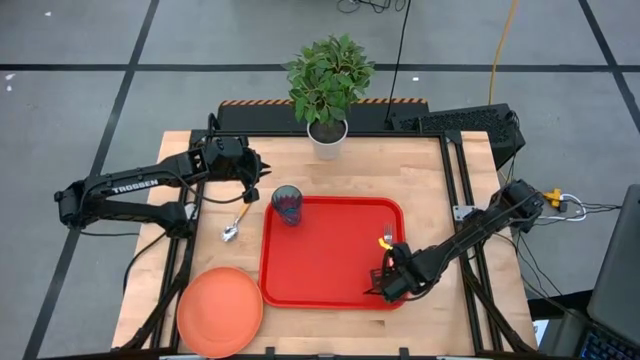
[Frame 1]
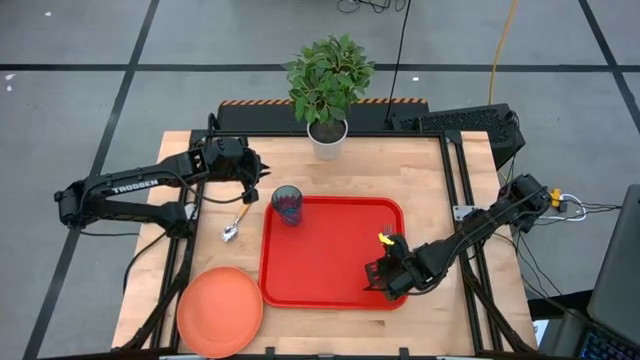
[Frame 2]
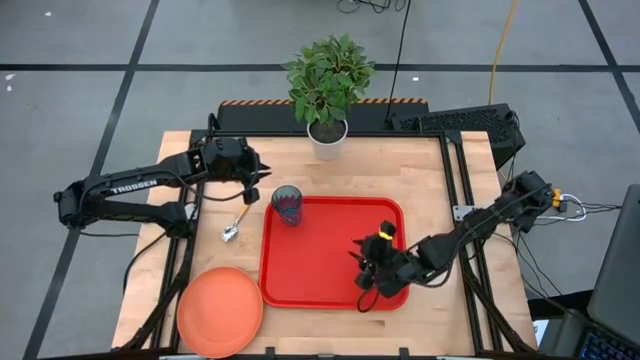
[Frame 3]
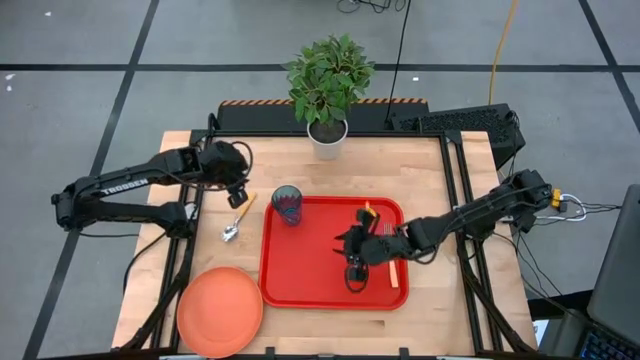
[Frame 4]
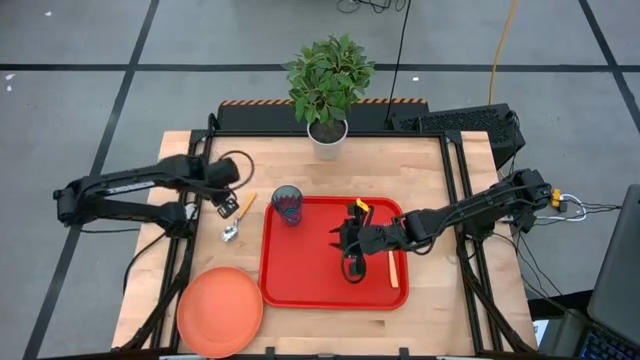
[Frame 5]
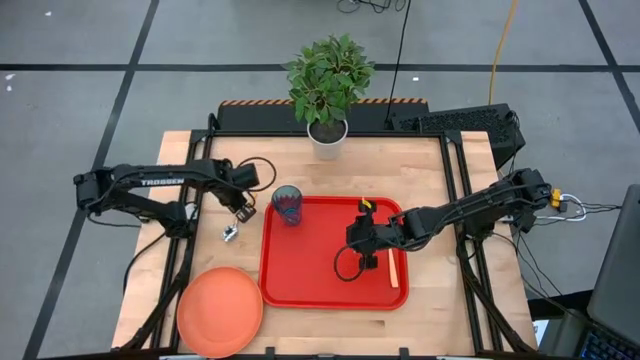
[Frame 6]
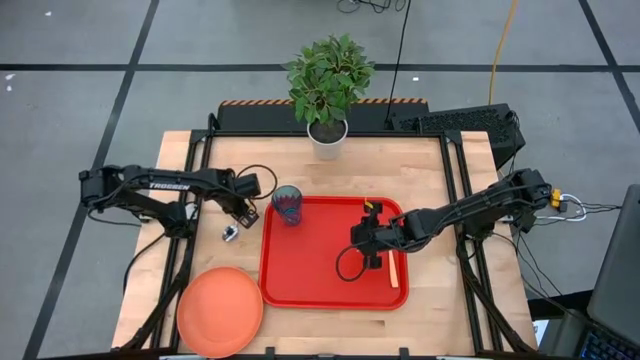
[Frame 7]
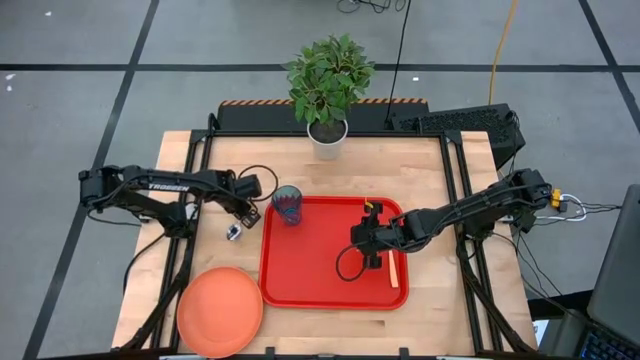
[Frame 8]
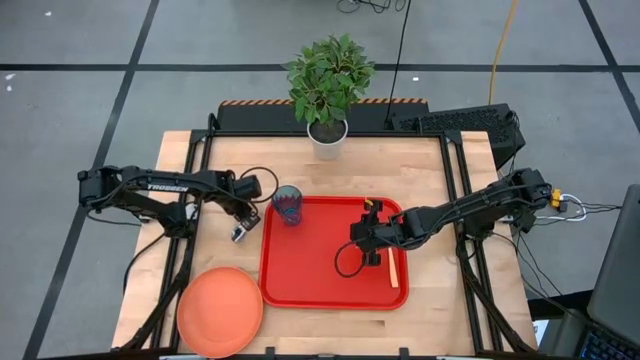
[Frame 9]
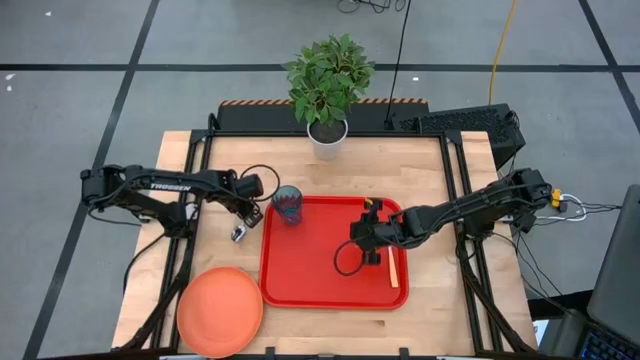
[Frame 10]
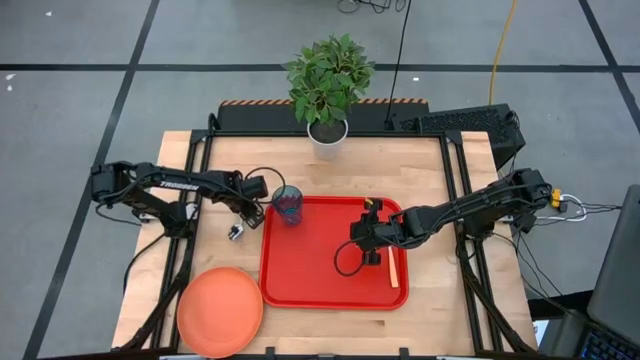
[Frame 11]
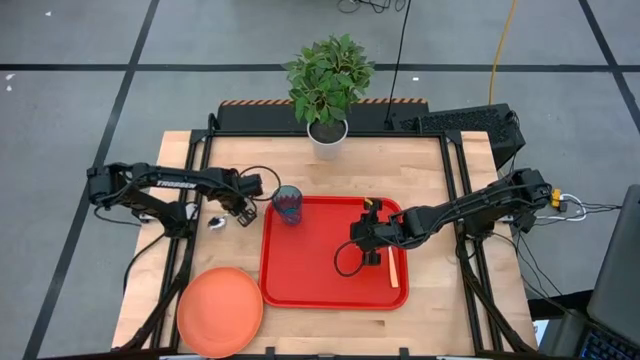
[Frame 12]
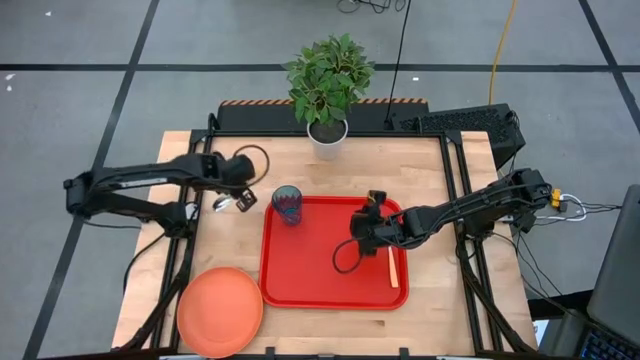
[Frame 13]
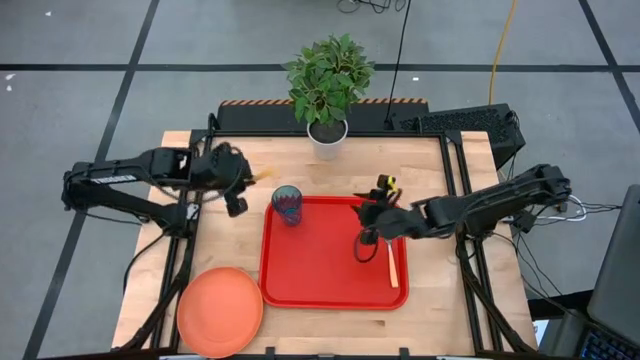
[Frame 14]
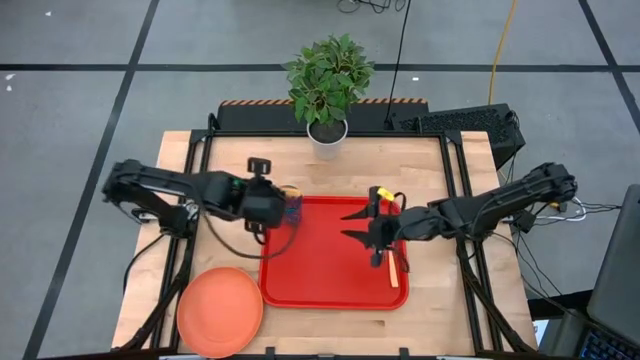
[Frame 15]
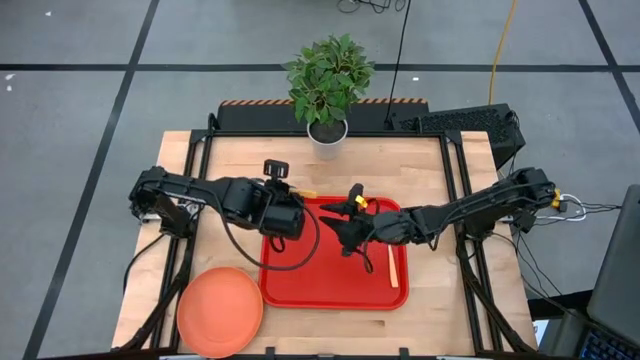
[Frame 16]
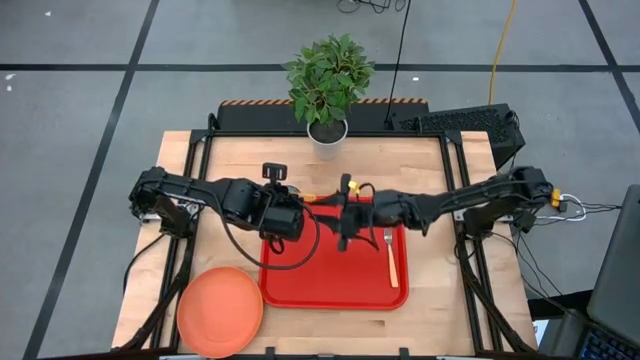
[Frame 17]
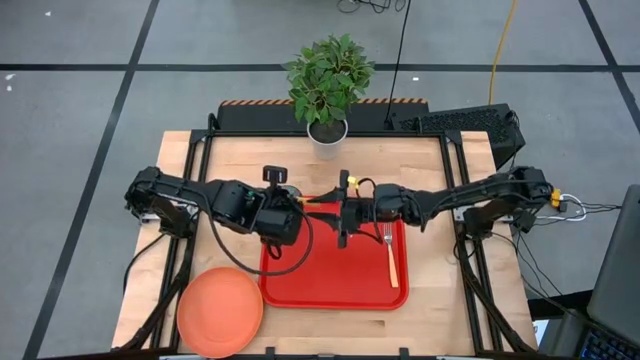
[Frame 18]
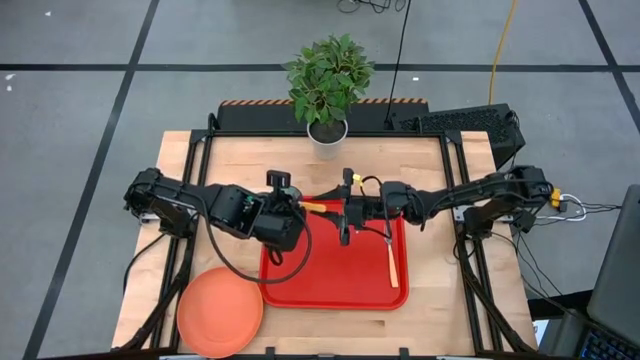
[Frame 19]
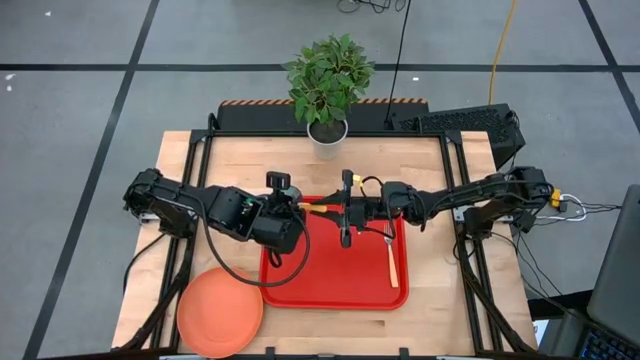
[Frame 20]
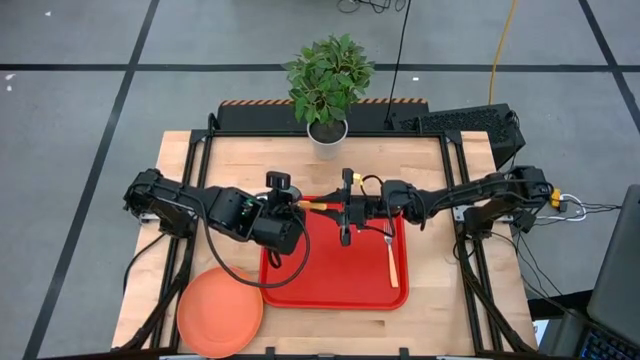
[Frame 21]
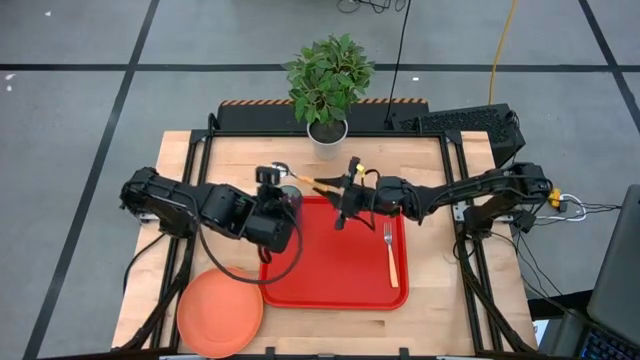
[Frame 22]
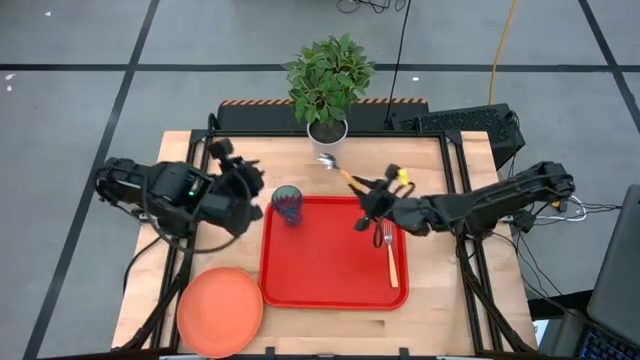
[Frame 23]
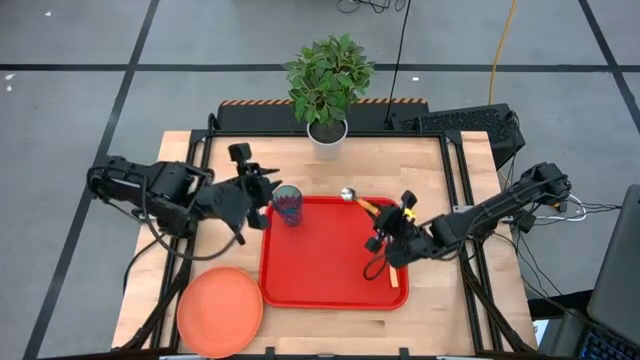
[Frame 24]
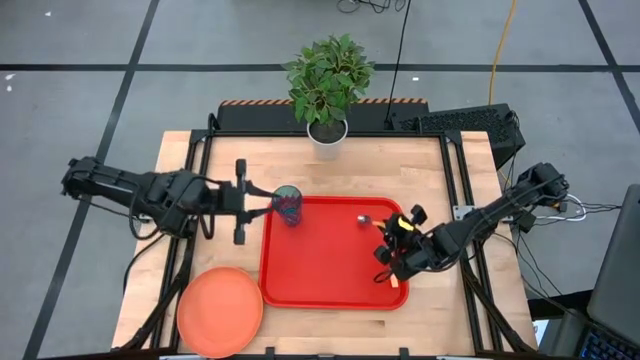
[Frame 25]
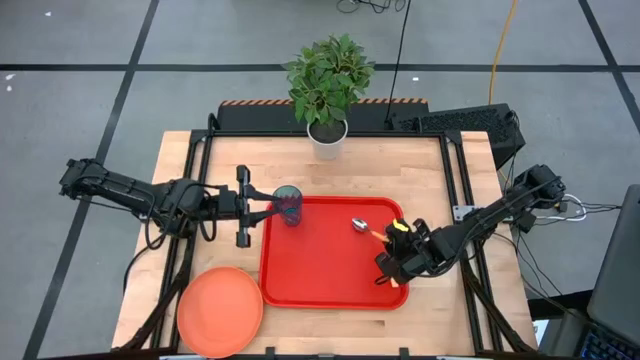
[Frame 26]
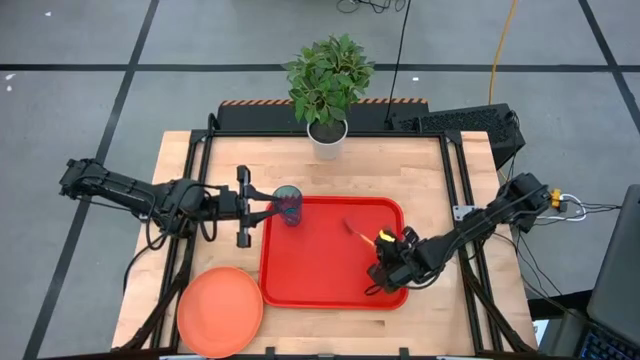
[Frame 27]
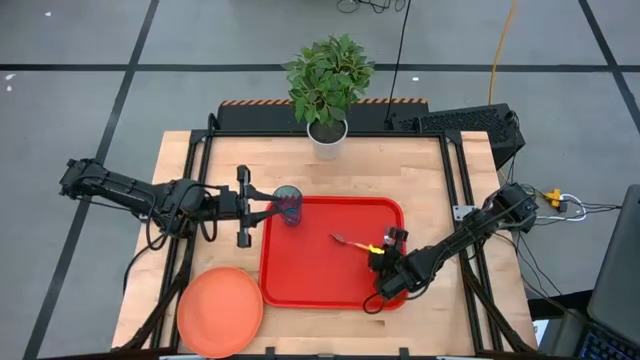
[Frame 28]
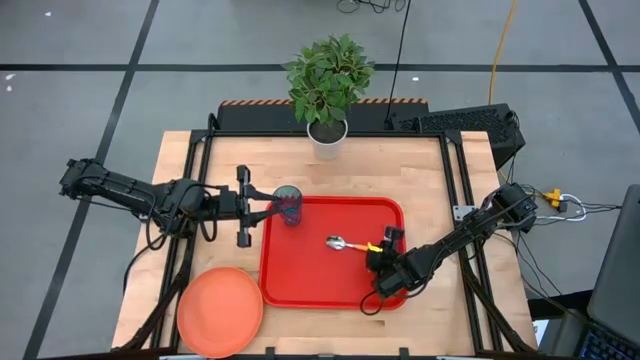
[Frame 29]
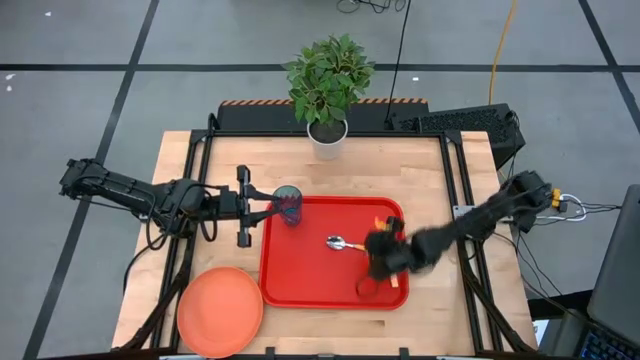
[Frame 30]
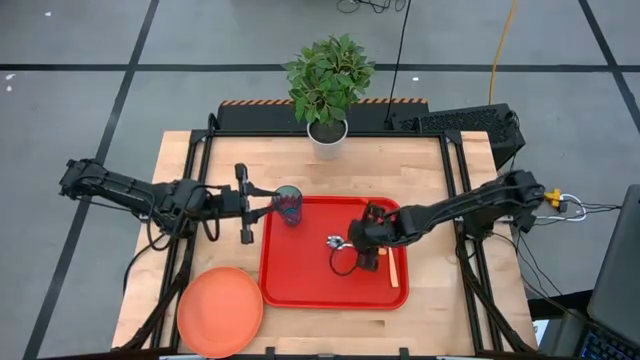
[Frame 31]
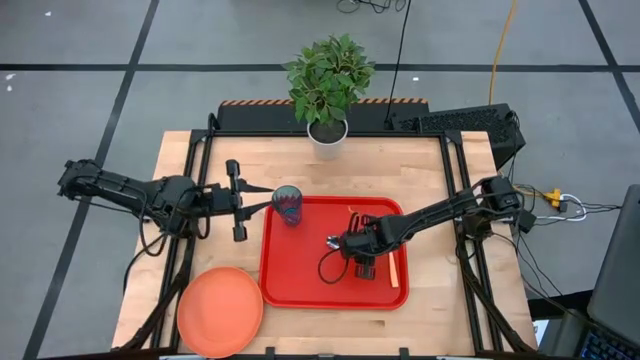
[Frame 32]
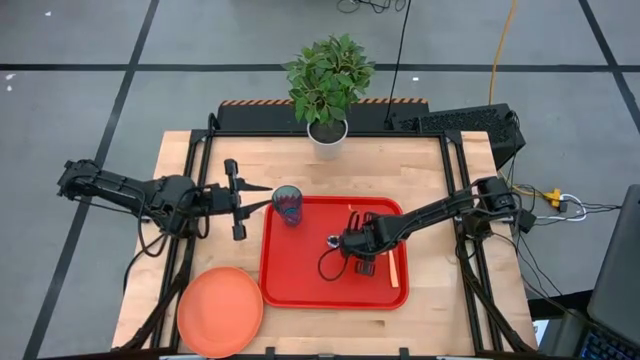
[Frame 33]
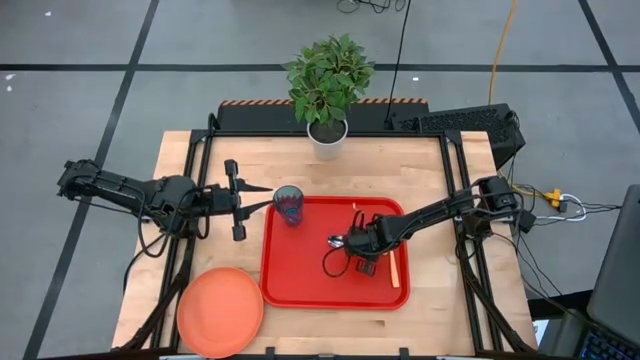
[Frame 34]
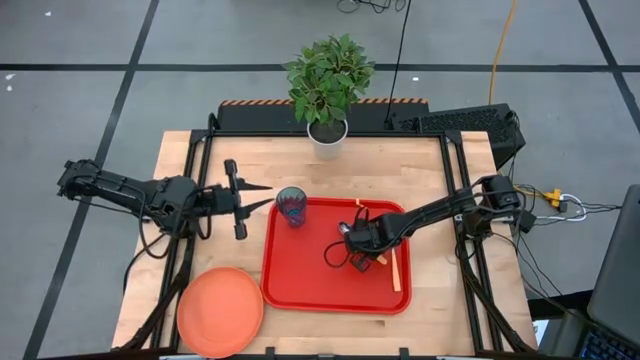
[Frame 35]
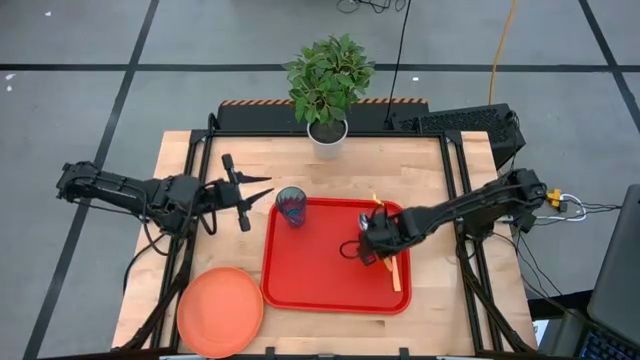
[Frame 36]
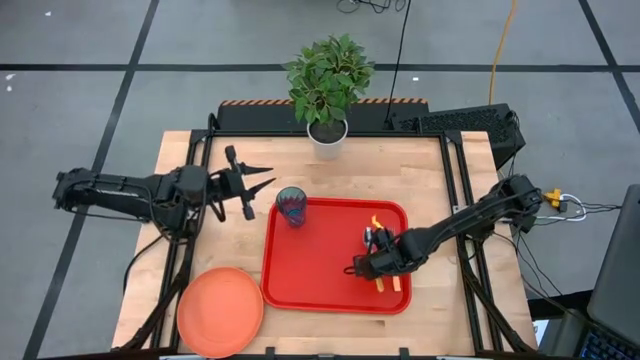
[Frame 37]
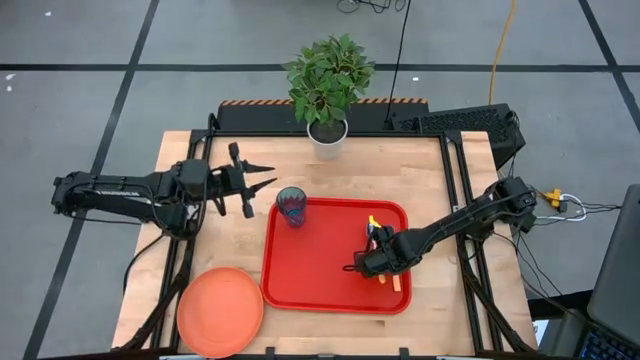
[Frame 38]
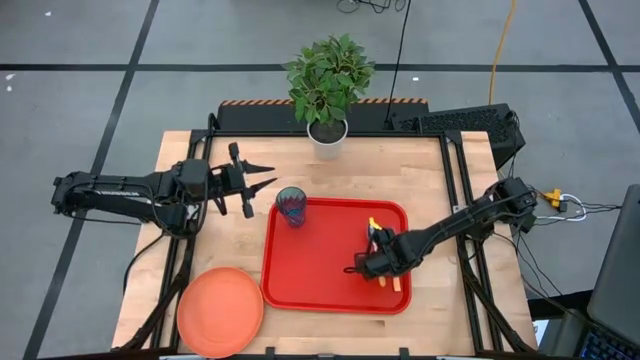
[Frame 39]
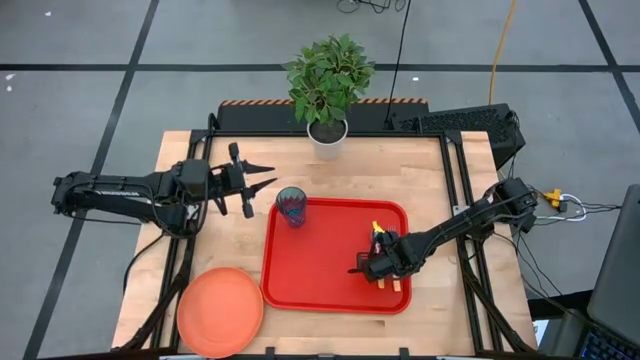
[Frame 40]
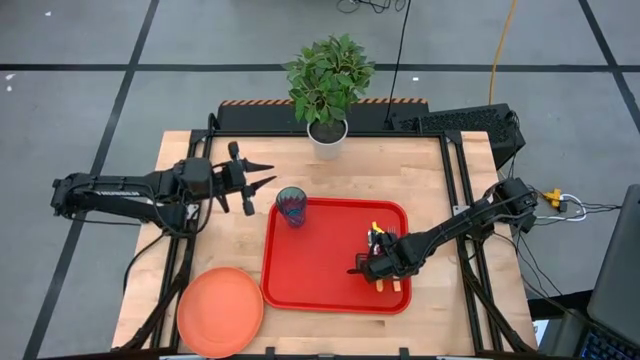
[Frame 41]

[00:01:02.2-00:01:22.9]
Task: Pick and place plate/cup/fork/spoon on tray
Put the yellow spoon to the left of the light brown fork on the red tray

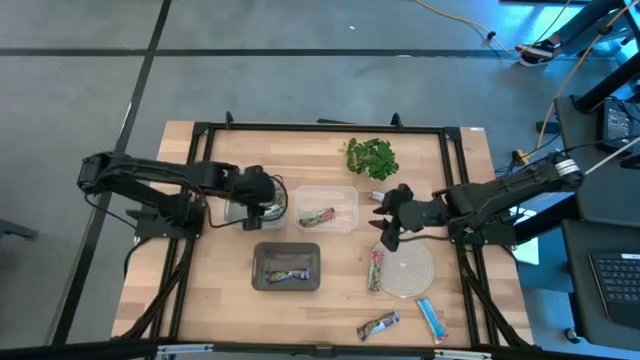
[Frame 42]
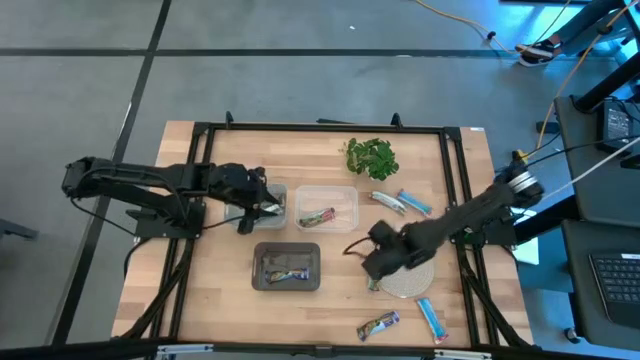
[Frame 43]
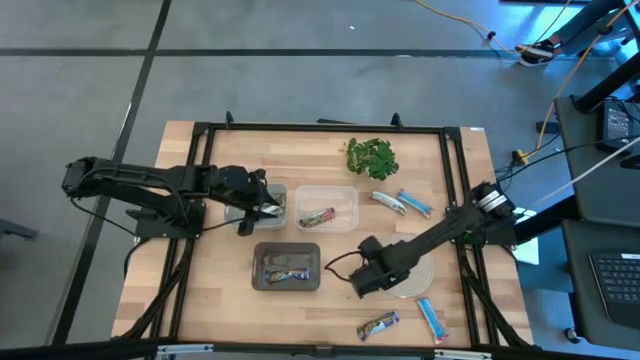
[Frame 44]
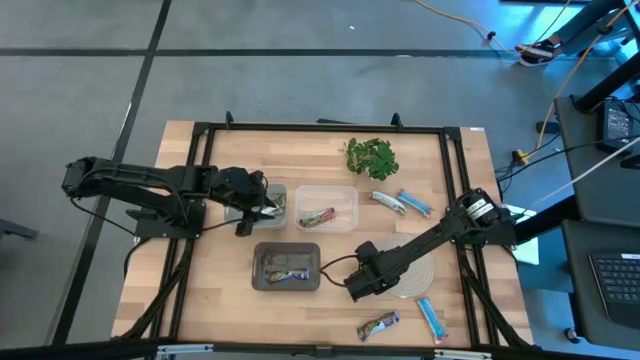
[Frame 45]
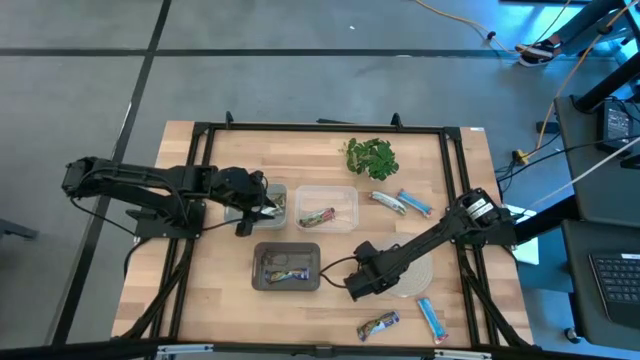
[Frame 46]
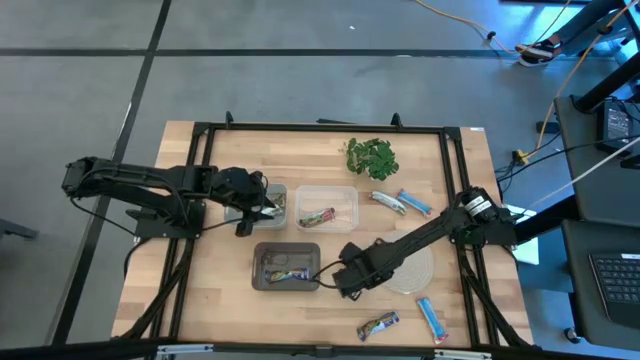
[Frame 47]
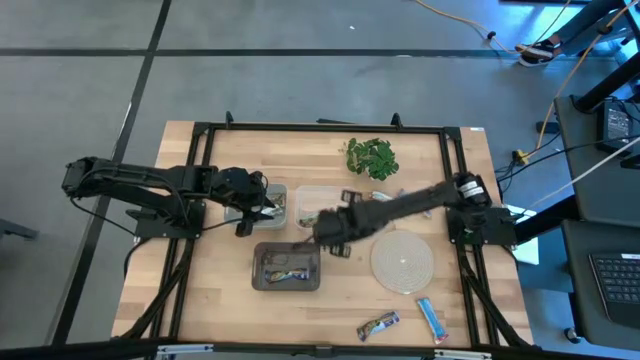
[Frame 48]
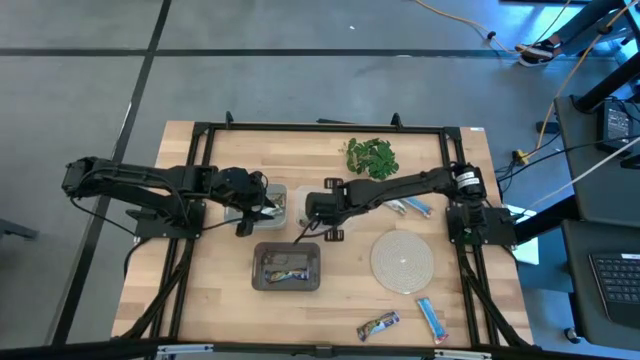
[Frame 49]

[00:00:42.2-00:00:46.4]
Task: Pick and place Granola Bars by type
Put the red granola bar into the white transparent bin
